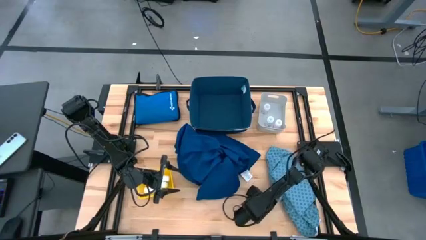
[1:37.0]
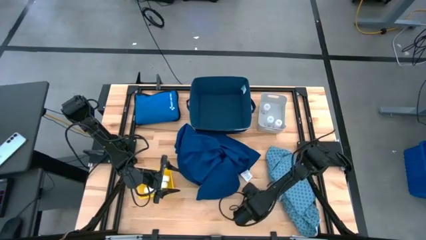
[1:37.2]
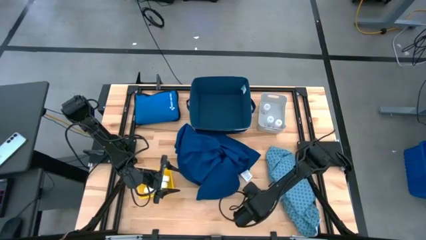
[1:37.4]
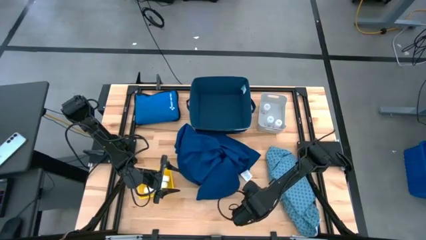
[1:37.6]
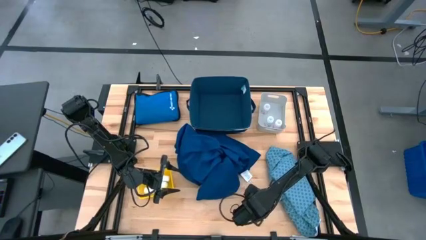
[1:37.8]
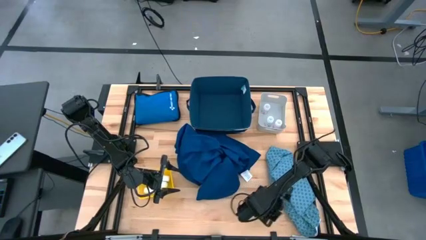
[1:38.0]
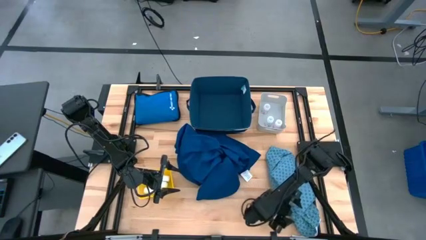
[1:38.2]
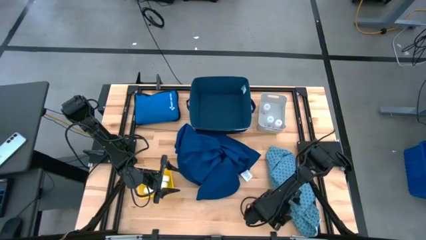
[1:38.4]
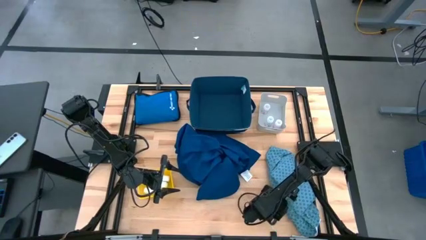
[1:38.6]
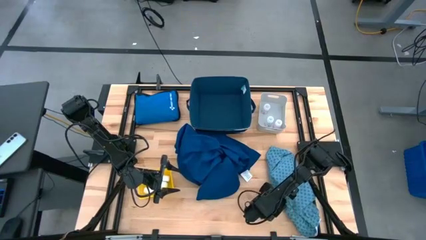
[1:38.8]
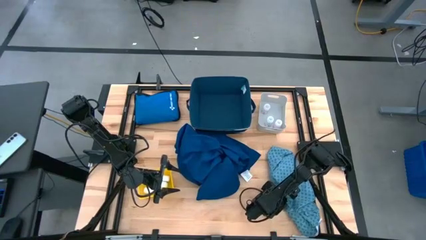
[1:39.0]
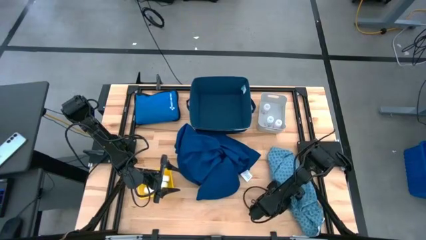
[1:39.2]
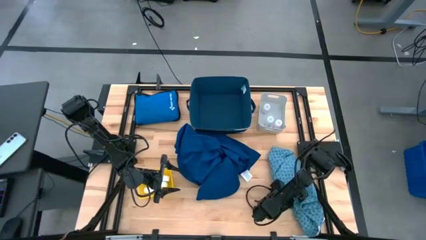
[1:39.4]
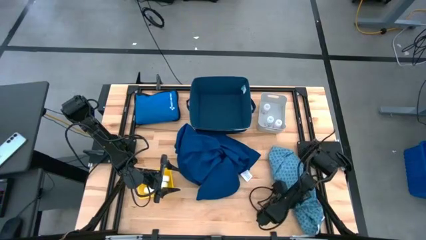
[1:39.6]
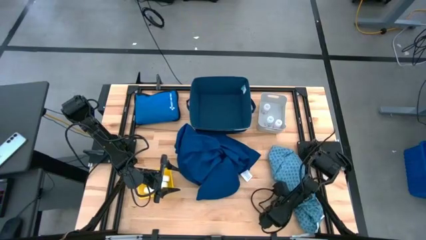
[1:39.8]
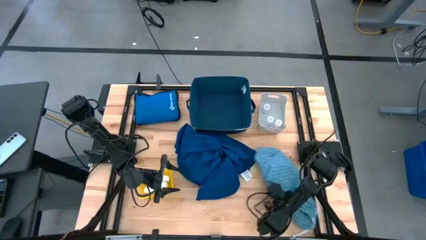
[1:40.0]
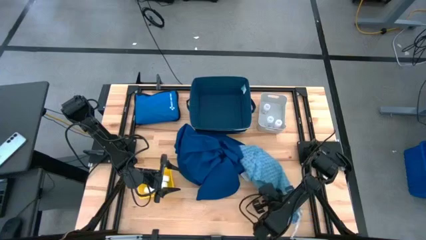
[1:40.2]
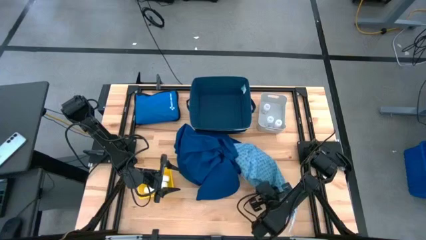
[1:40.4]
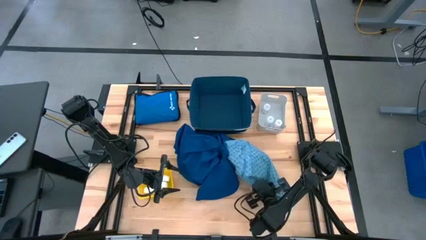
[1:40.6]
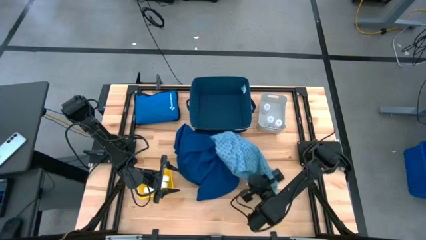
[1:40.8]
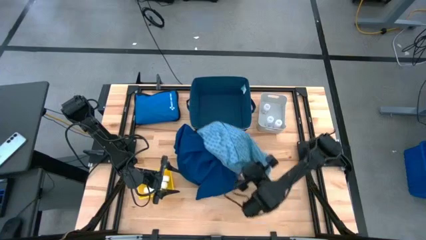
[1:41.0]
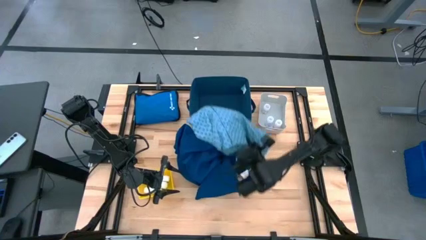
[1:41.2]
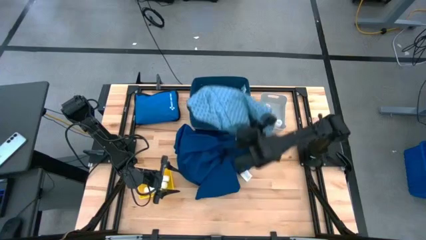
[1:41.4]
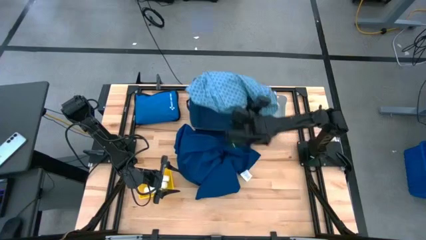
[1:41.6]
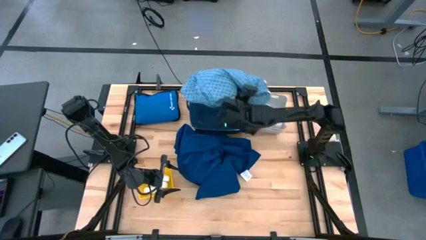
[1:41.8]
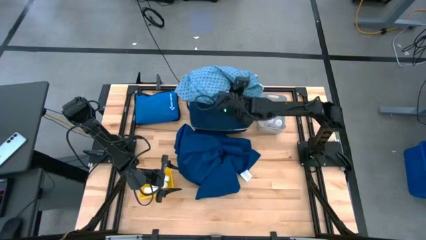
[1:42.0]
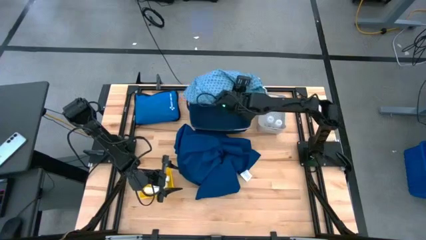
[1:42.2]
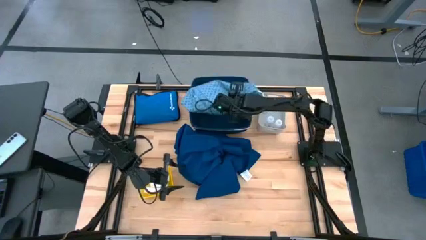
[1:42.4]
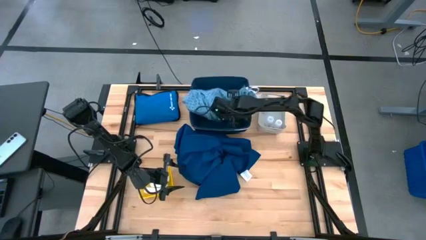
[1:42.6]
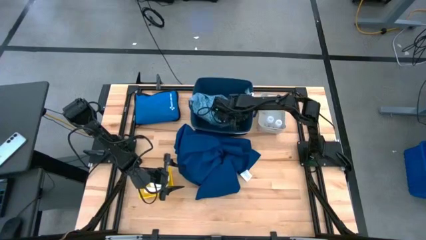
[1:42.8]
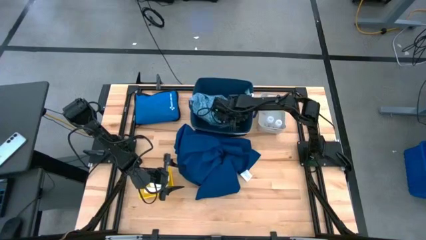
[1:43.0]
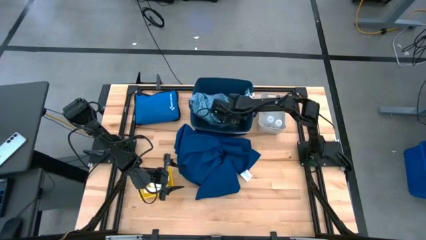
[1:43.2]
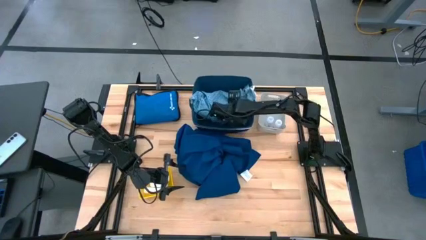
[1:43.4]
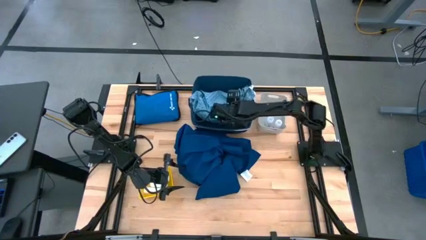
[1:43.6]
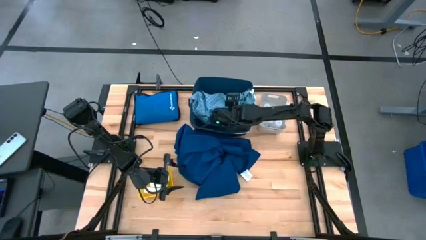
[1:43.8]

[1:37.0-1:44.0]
Task: Pick & Place Medicine items
Put the patterned light blue patient gown into the blue bin

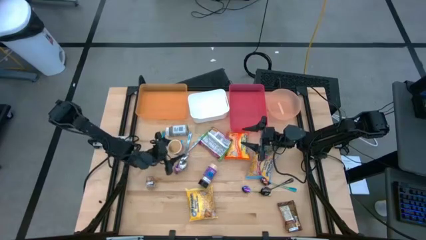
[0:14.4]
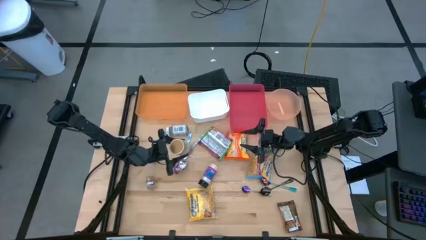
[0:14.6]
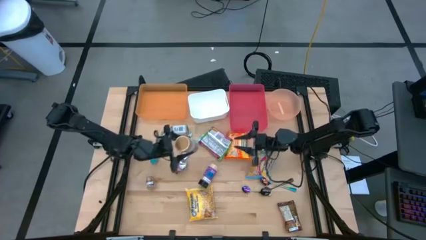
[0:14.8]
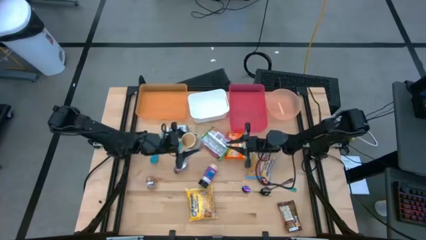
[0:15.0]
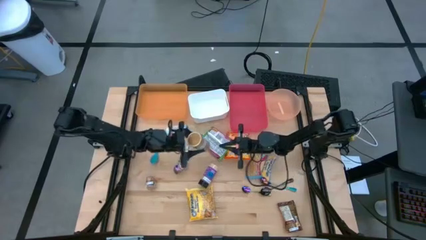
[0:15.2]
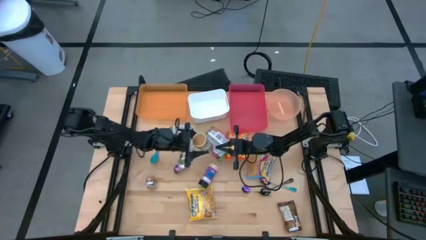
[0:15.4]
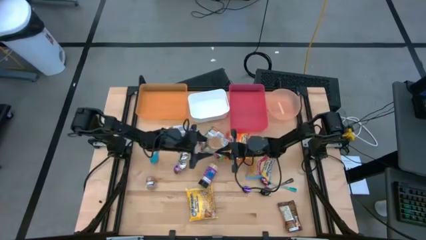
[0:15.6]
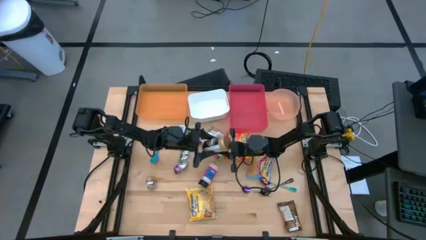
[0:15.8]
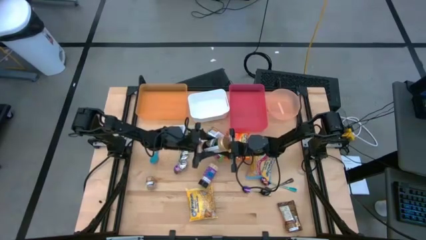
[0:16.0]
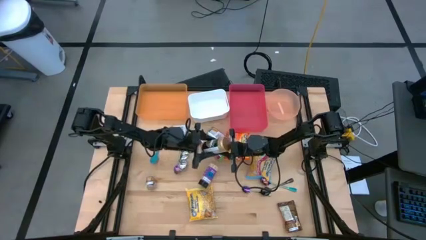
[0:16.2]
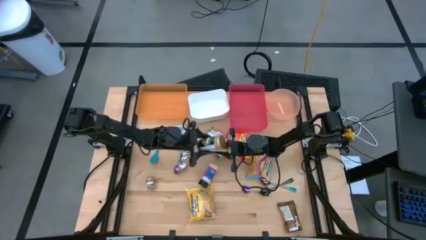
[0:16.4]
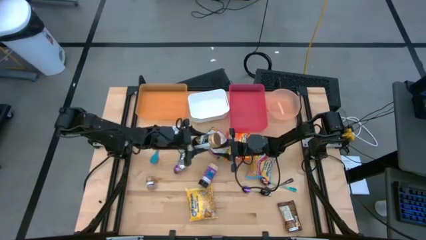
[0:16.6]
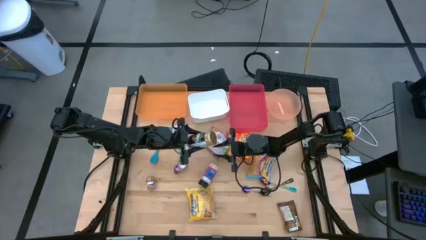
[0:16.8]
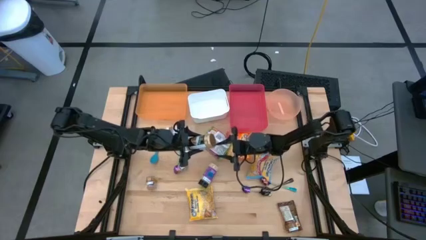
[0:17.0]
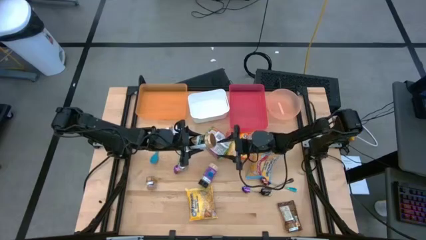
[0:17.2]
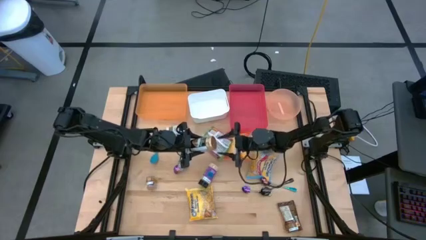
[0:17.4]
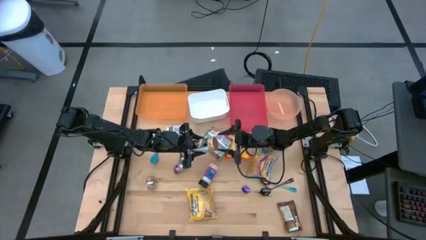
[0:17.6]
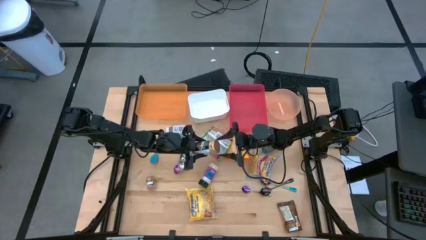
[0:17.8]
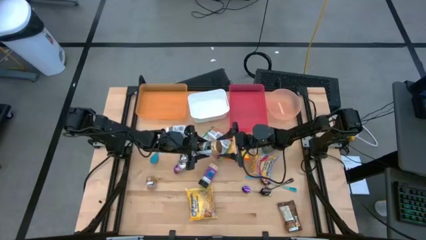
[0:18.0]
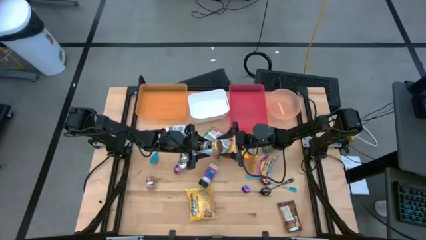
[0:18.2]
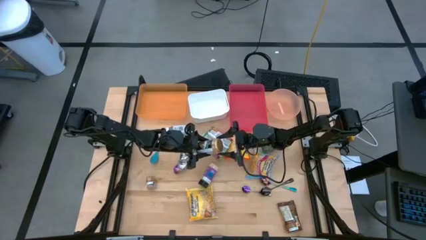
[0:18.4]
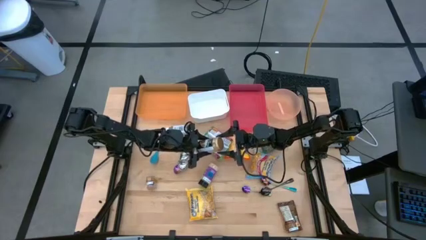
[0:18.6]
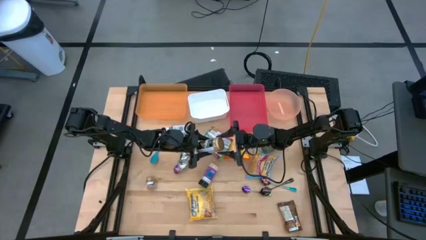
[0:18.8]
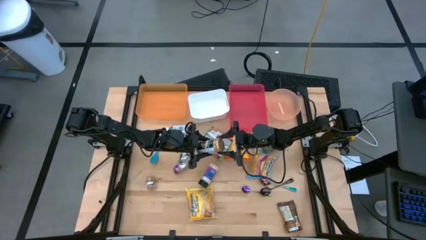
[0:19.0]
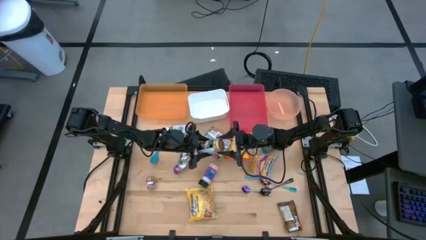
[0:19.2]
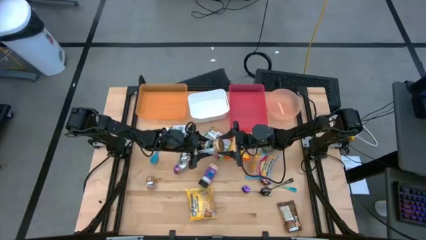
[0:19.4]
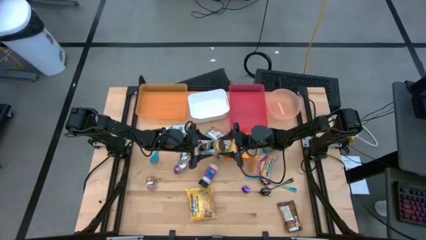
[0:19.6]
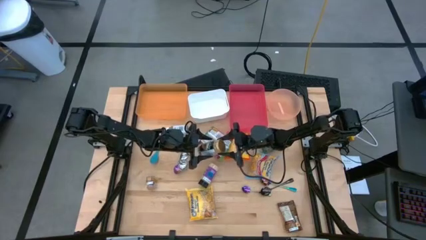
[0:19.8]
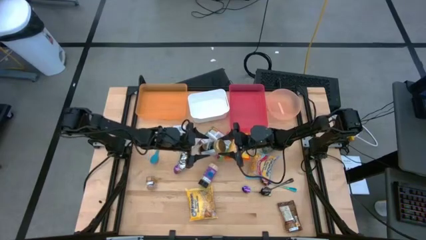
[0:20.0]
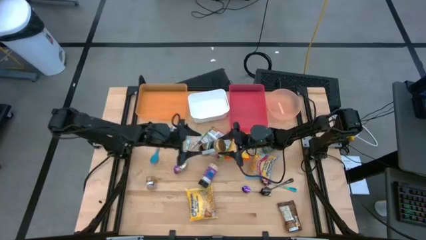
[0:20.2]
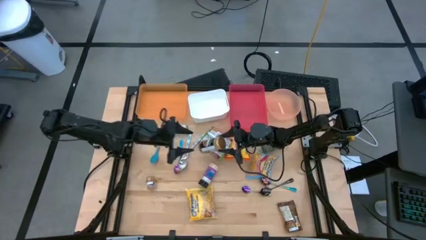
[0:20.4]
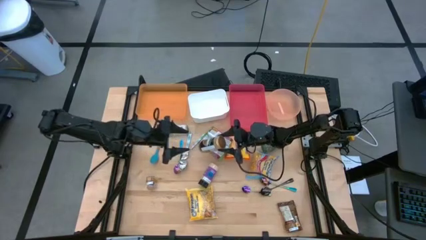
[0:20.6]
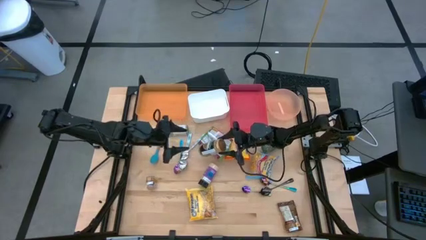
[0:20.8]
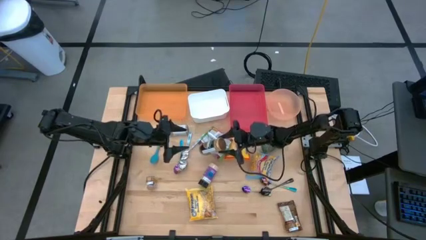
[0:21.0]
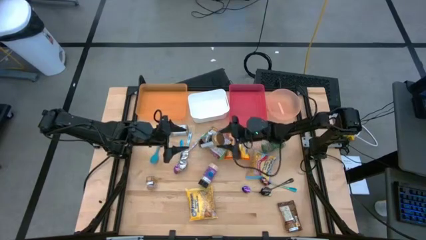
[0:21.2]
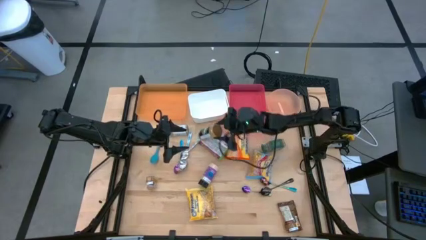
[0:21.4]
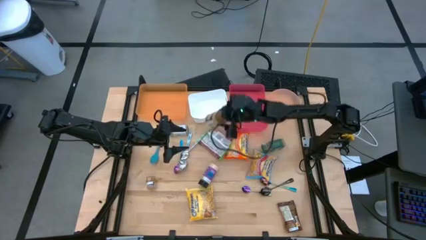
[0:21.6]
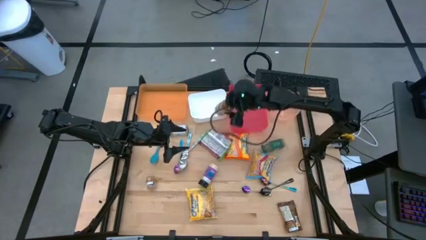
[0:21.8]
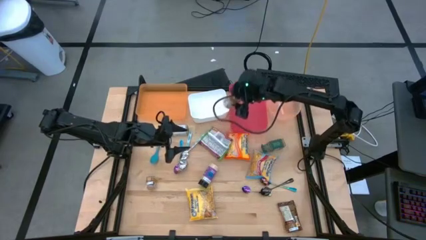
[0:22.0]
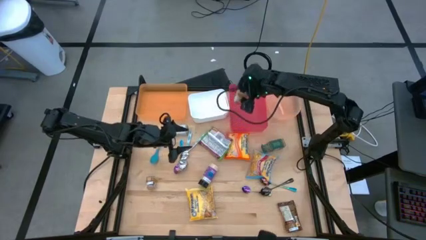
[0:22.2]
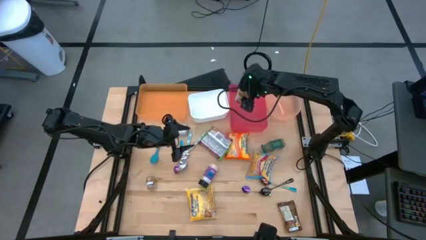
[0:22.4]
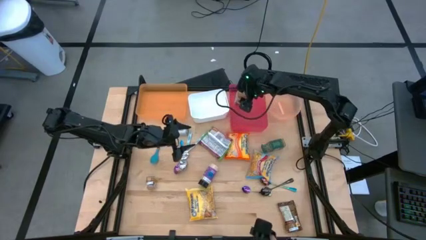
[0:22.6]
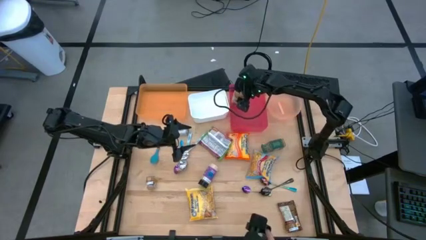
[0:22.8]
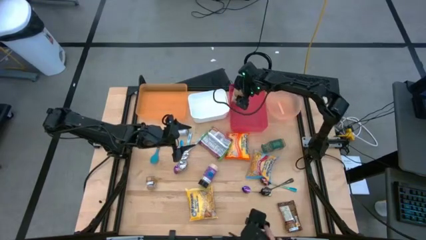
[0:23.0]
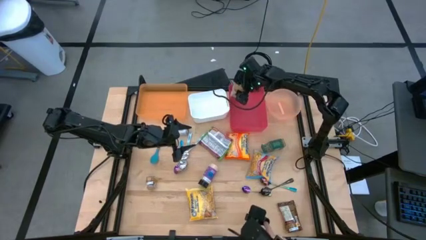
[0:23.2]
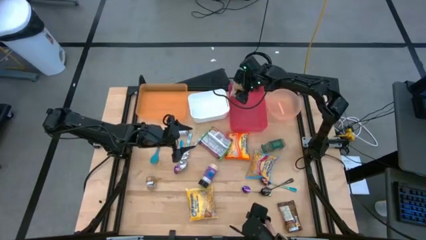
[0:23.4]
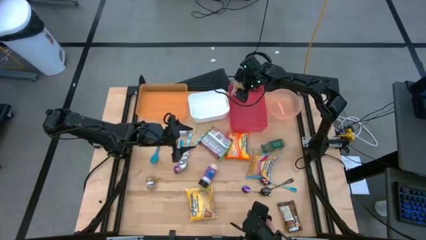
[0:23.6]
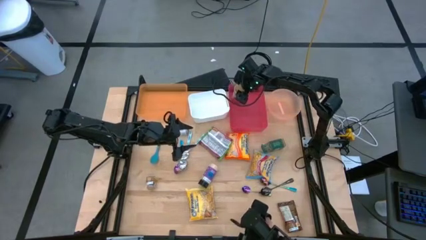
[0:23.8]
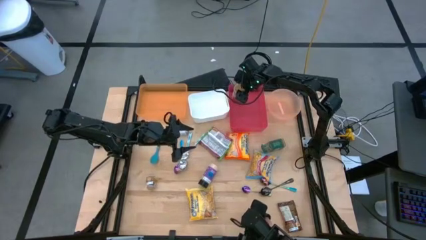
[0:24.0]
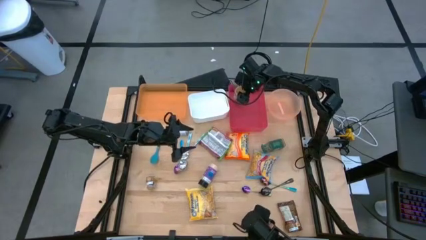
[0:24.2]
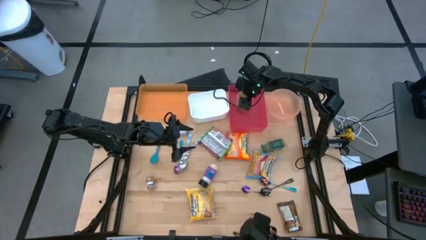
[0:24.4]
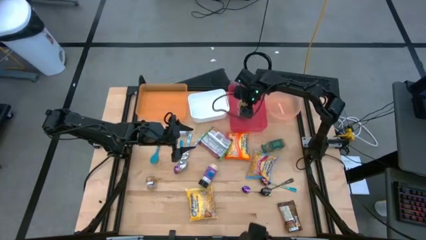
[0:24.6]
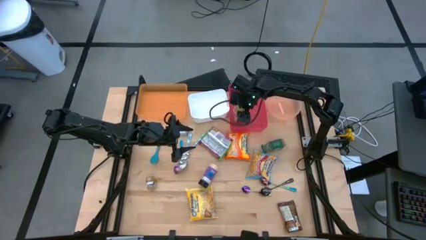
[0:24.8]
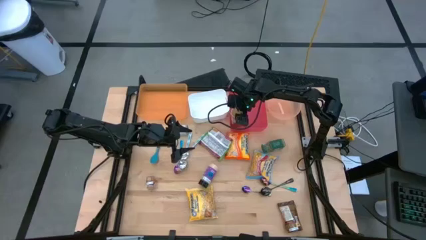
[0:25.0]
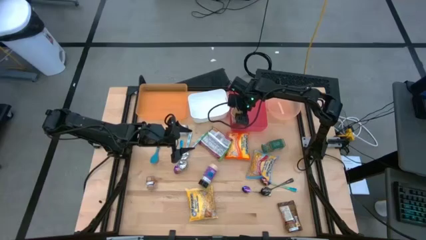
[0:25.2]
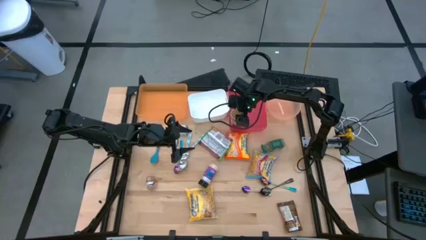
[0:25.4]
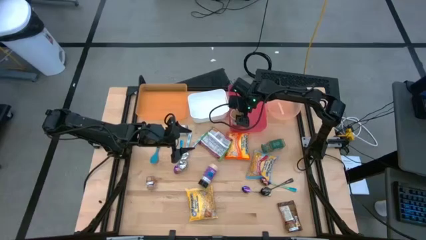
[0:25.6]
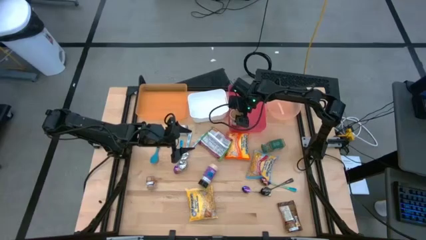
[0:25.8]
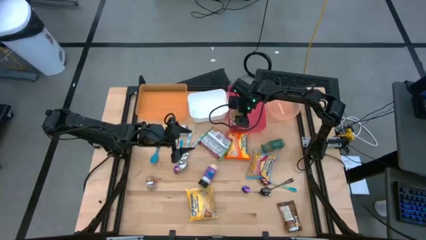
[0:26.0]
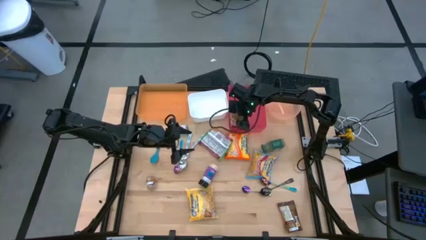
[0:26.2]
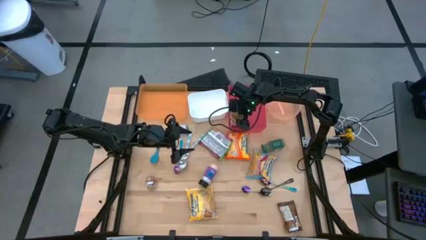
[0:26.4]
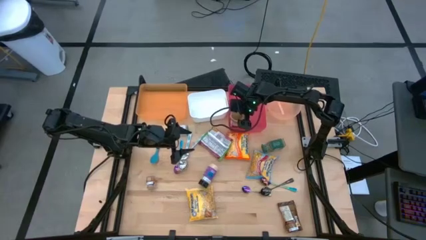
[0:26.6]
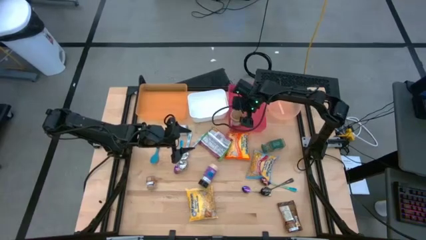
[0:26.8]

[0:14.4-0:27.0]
Task: Pick & Place Food Item
Put the gold seasoning bottle into the pink bin
